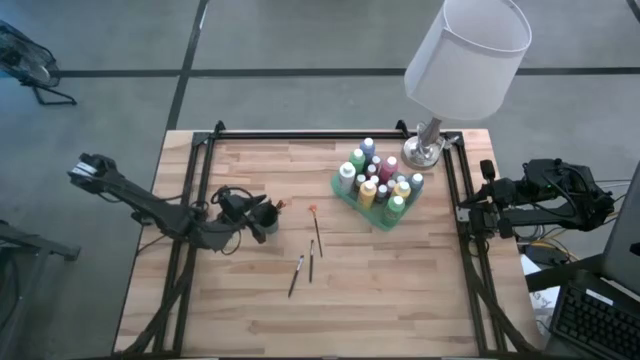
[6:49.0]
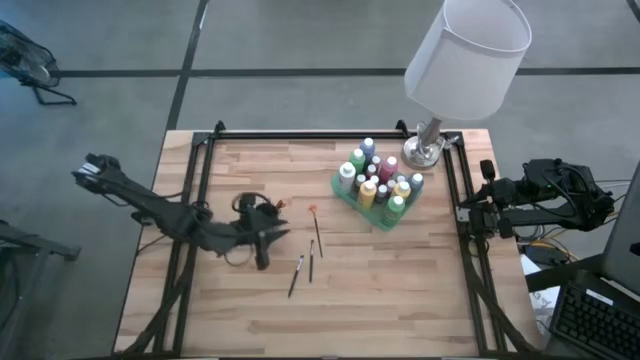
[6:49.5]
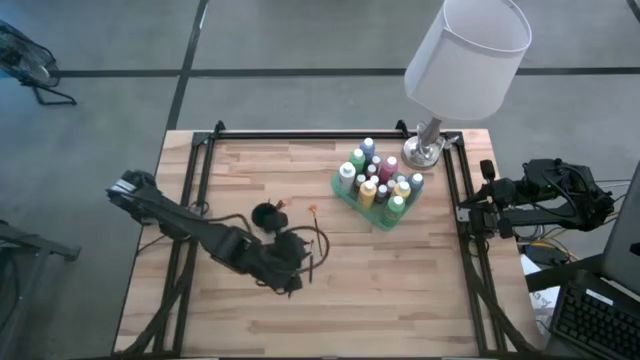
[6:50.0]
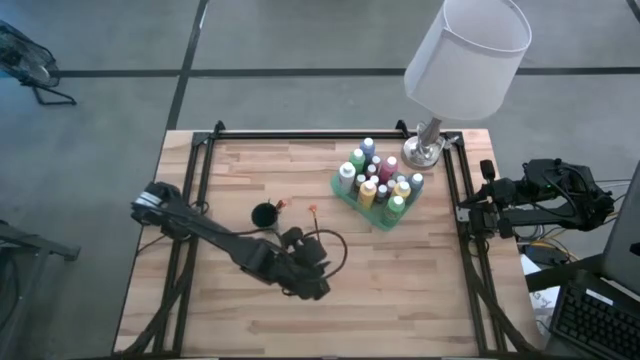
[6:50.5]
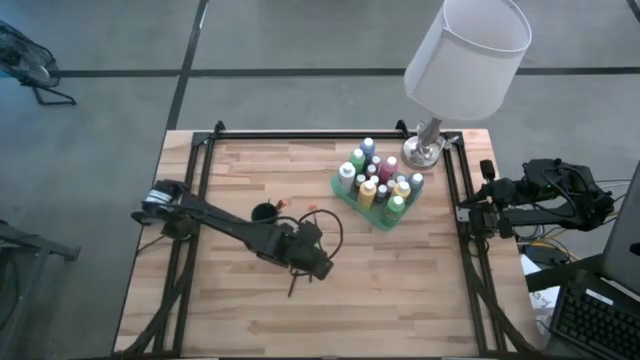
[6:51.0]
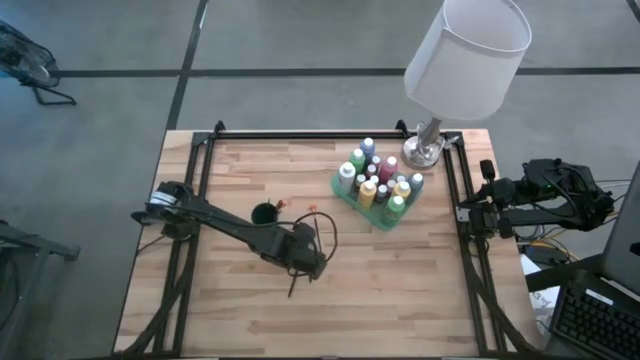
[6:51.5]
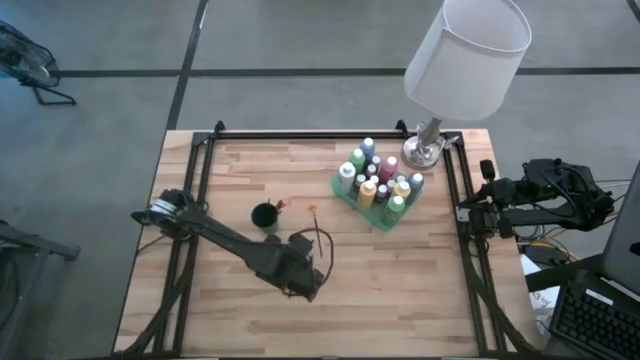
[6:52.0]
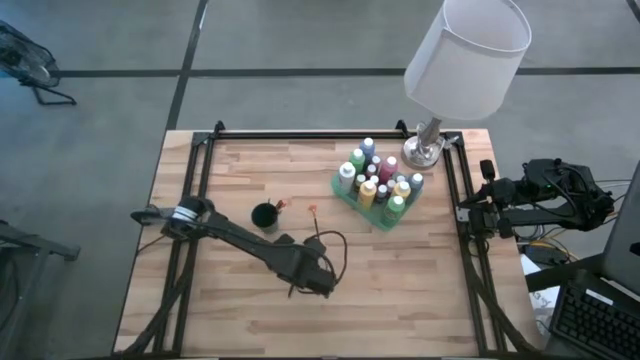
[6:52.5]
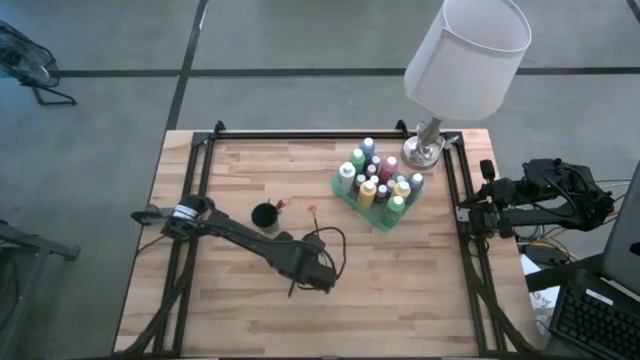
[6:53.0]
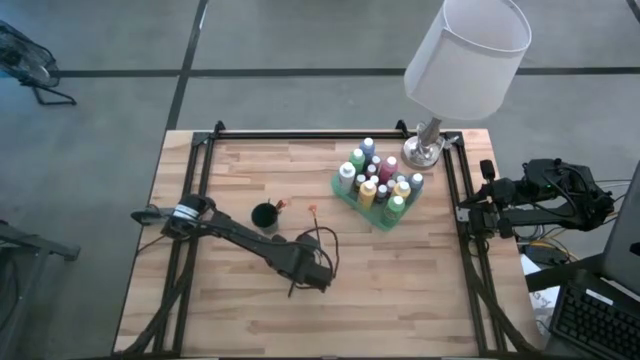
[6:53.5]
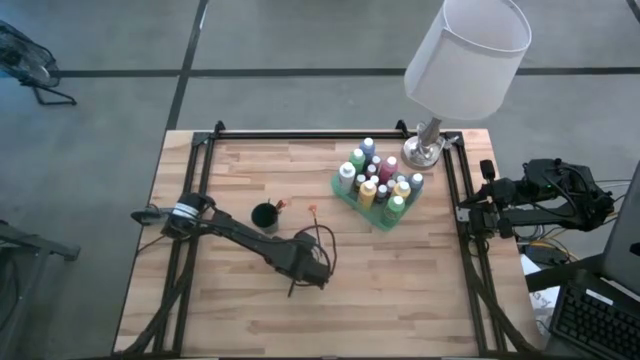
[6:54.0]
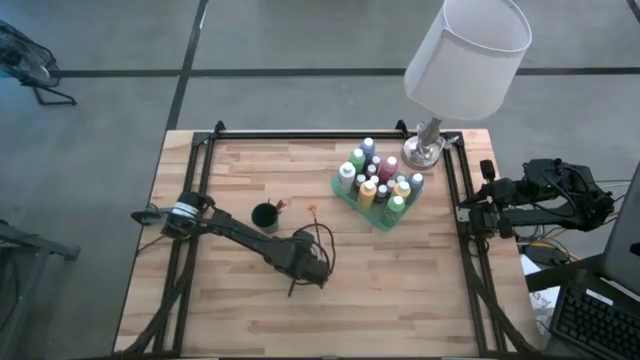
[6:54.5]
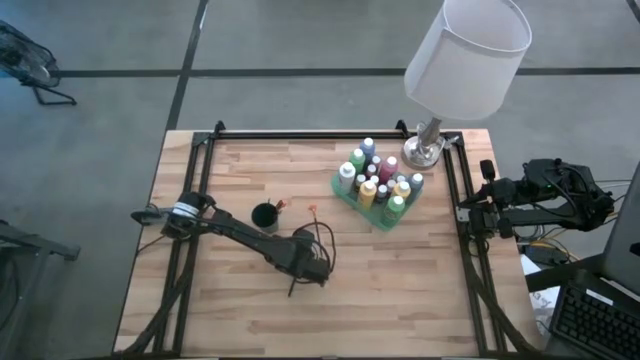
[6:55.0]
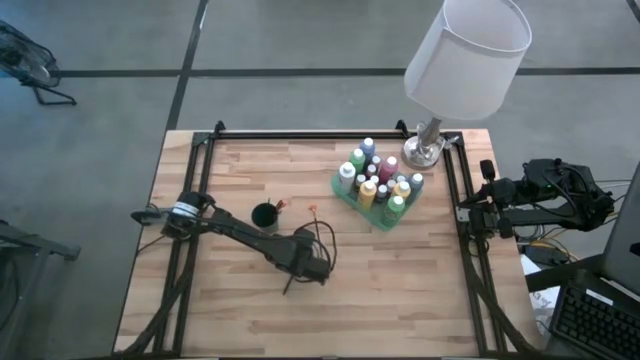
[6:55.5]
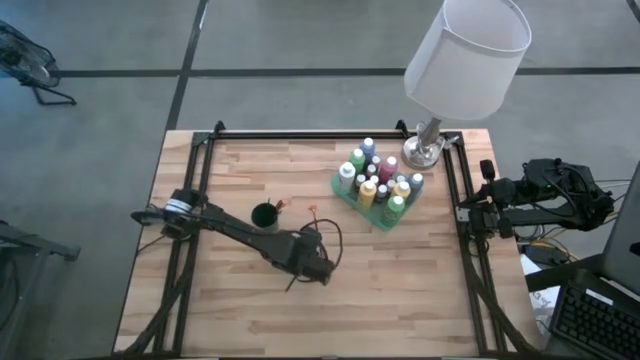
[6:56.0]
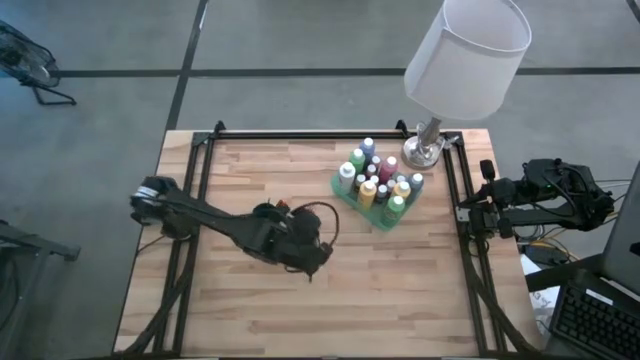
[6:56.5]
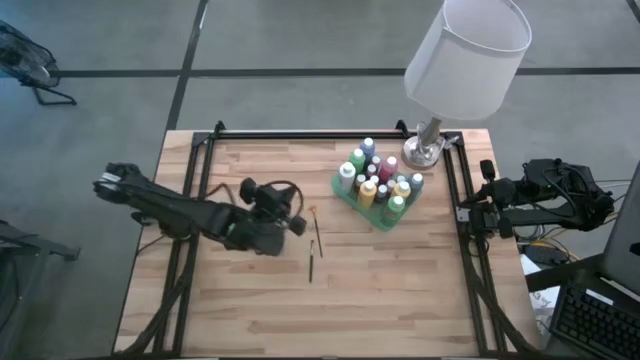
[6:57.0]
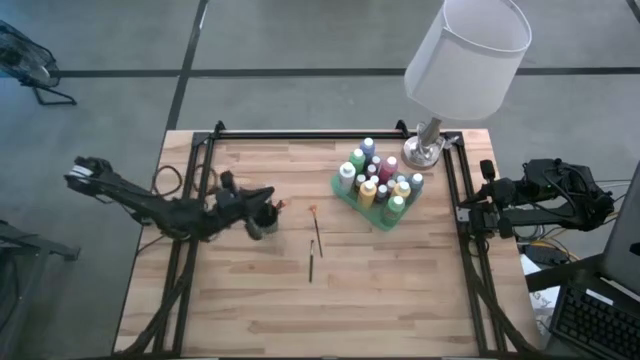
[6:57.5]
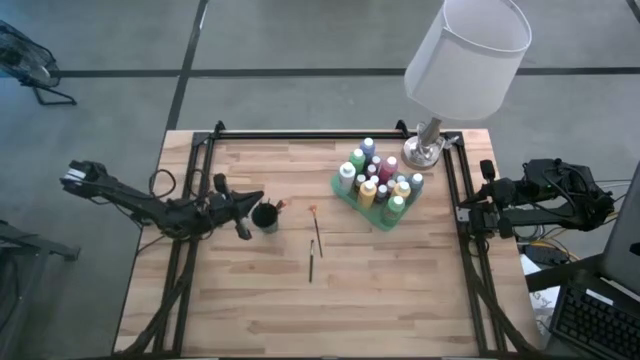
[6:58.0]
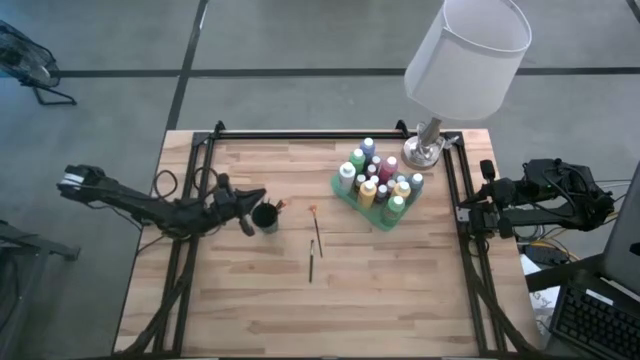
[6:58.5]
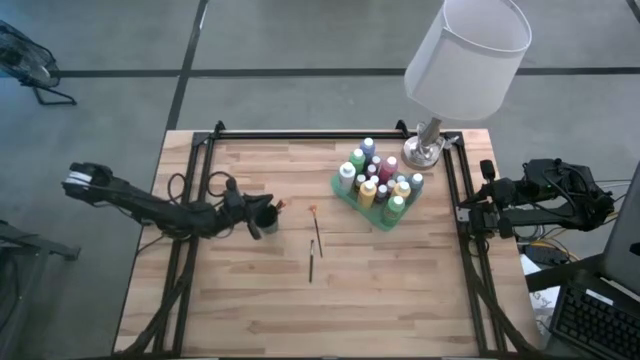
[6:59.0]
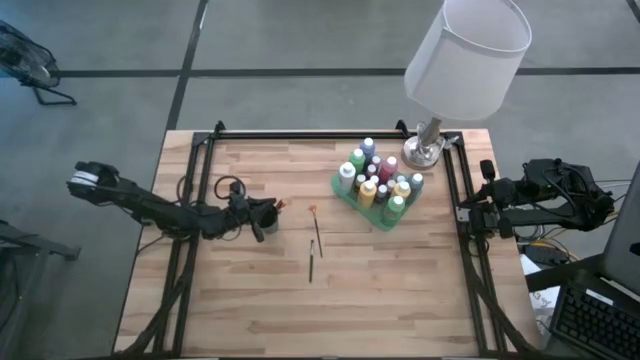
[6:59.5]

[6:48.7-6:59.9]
Task: Pick & Place Paint Supplies
Put the silver paint brush into the green cup

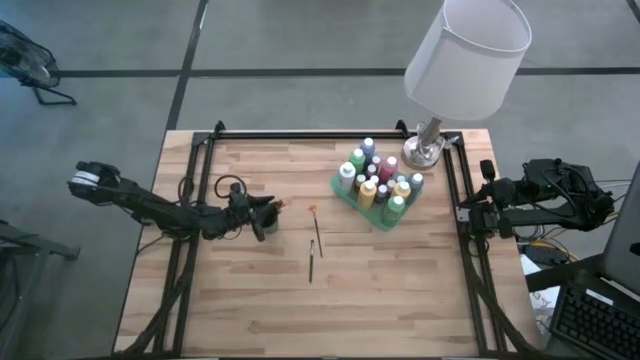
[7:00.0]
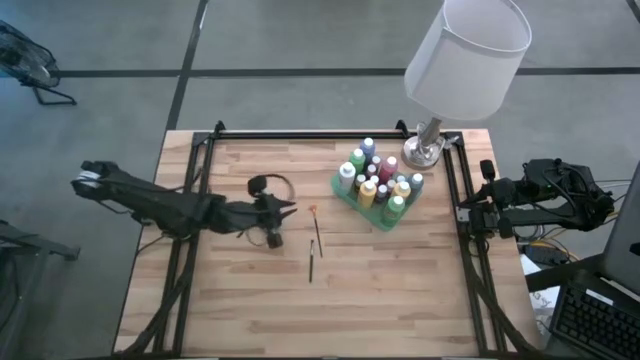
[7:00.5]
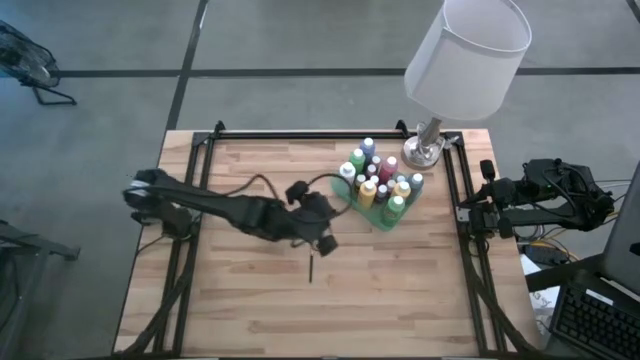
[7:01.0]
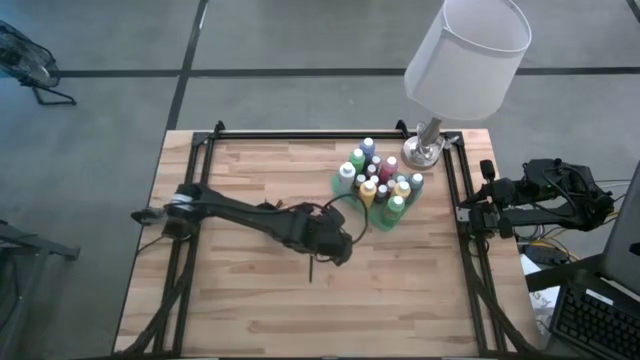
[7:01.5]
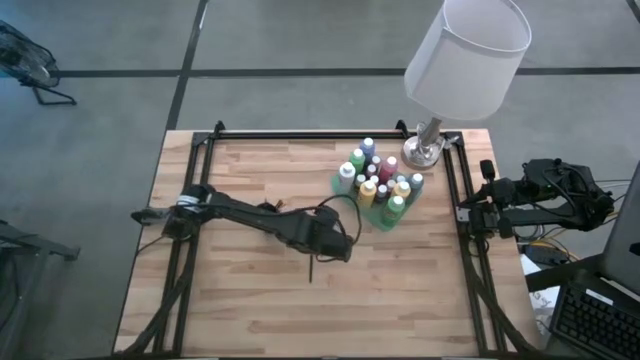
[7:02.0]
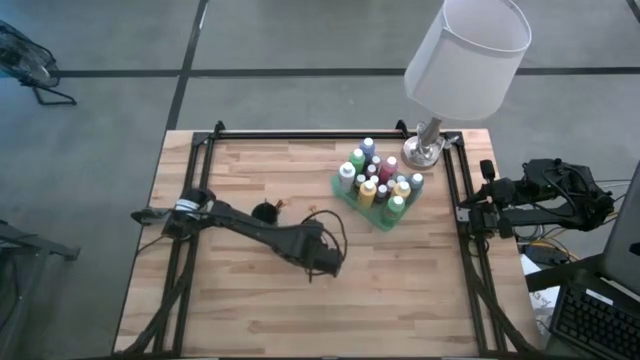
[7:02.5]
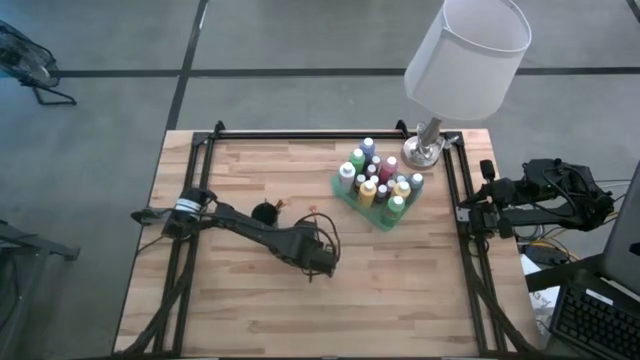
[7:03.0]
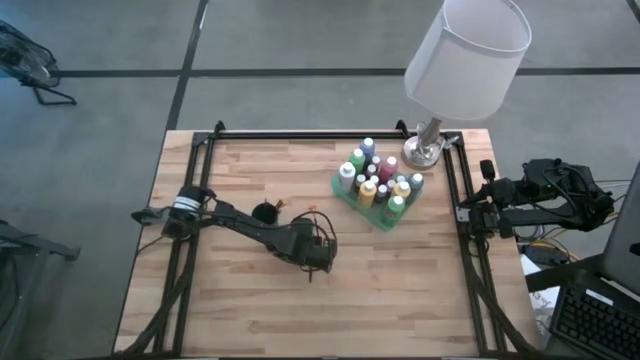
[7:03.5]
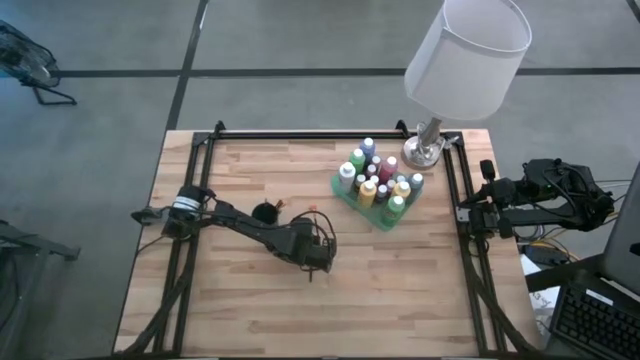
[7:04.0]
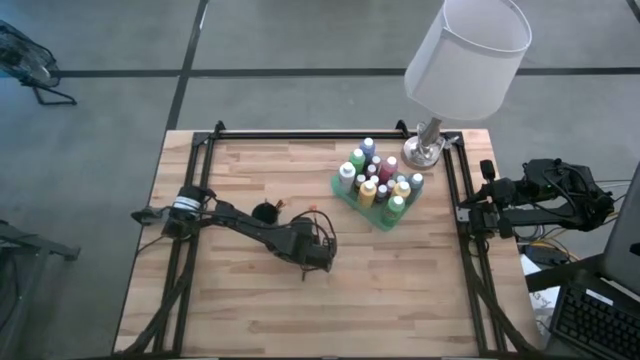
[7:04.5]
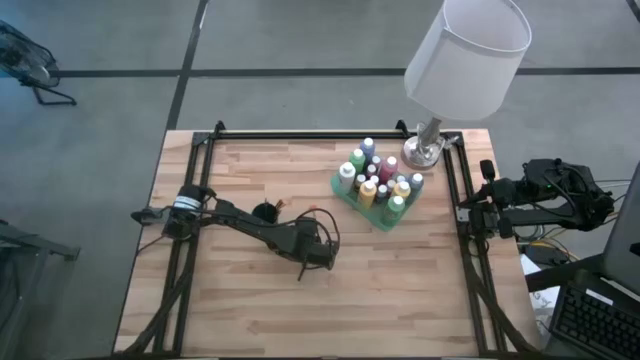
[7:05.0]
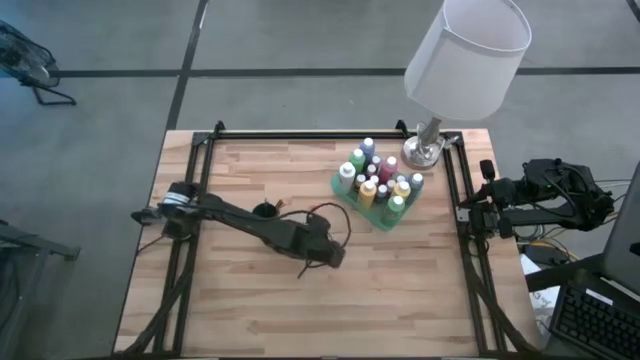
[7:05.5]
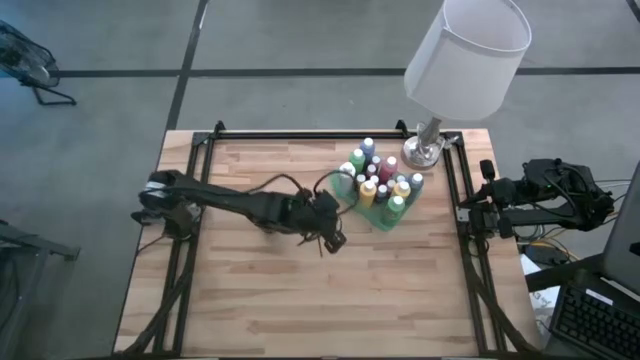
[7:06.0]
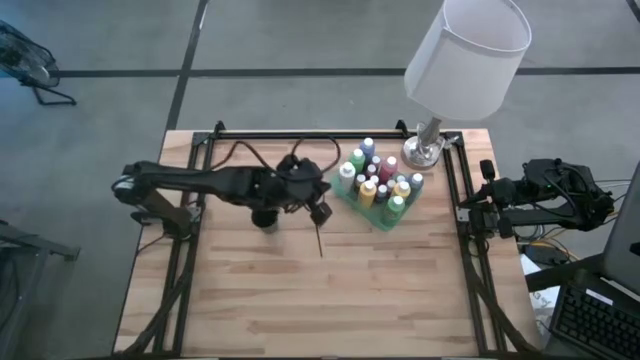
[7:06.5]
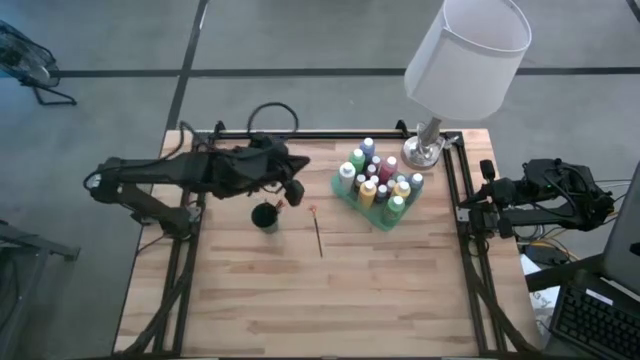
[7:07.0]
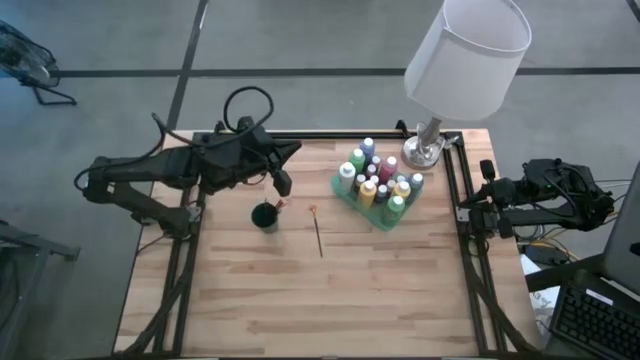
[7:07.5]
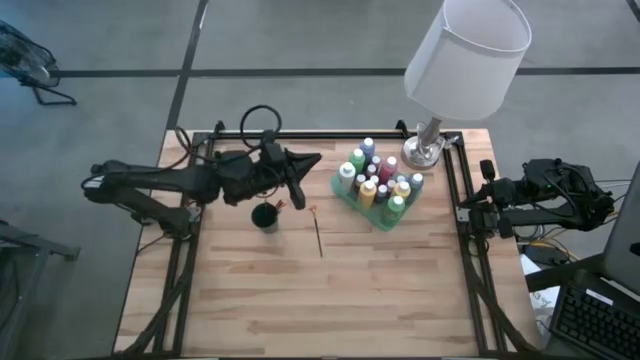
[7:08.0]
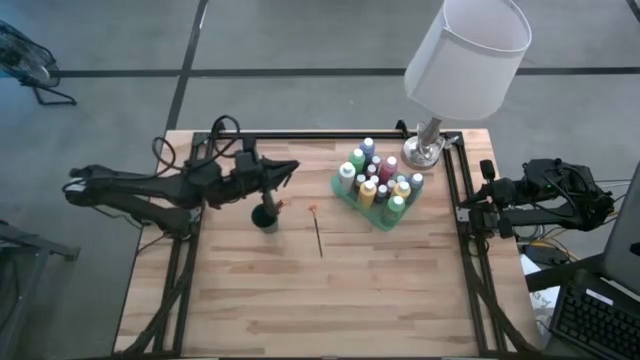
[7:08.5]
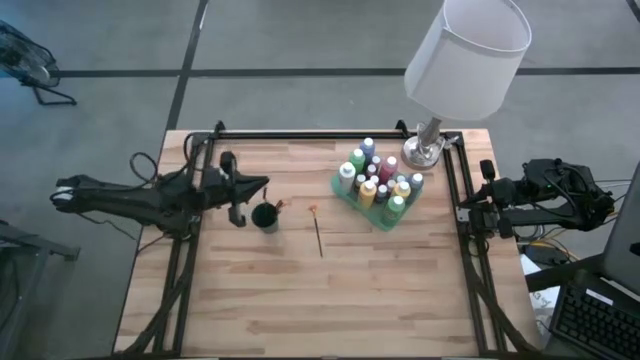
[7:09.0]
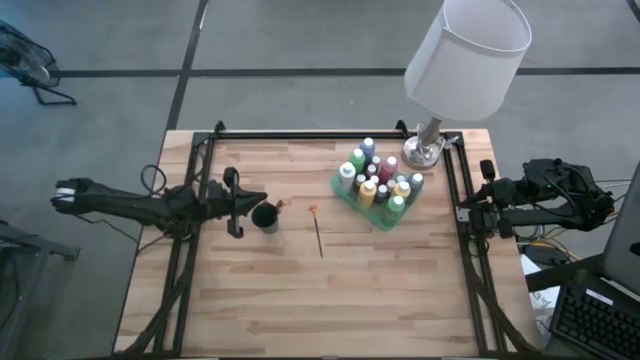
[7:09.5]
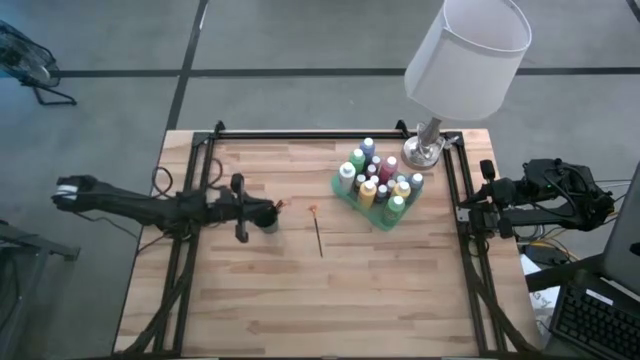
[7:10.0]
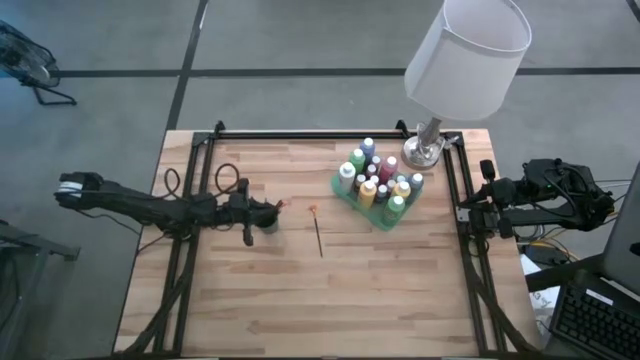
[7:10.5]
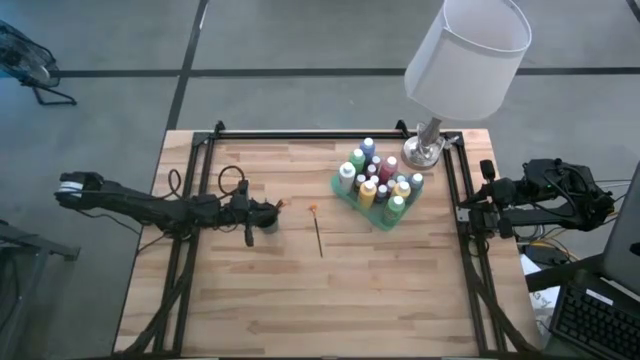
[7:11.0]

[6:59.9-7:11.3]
Put the silver paint brush into the green cup
